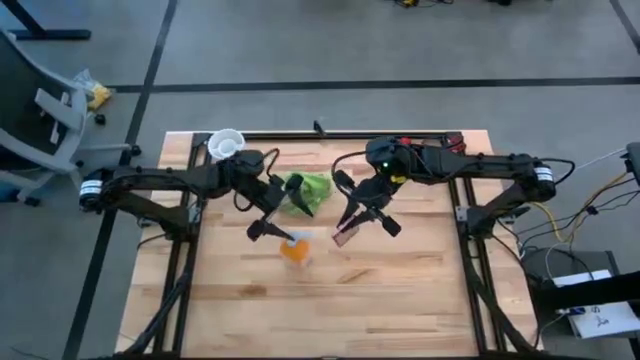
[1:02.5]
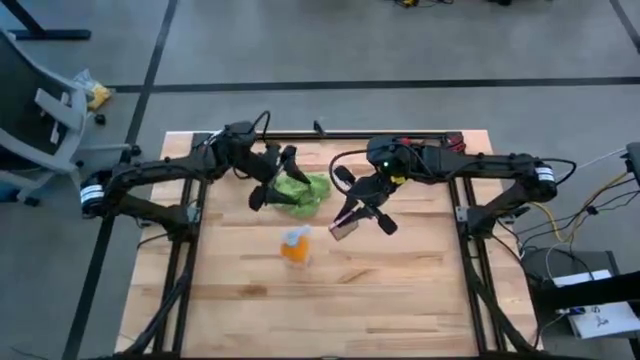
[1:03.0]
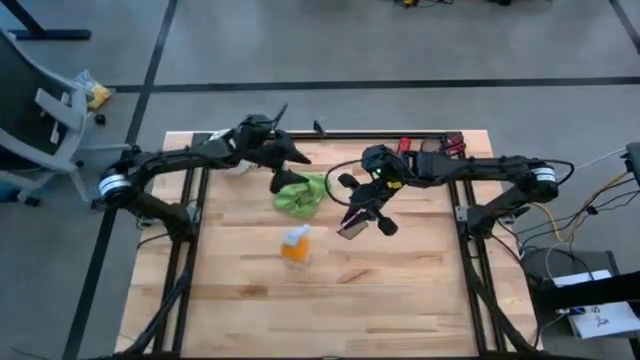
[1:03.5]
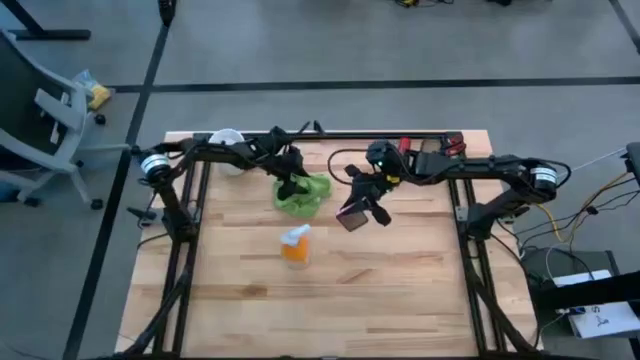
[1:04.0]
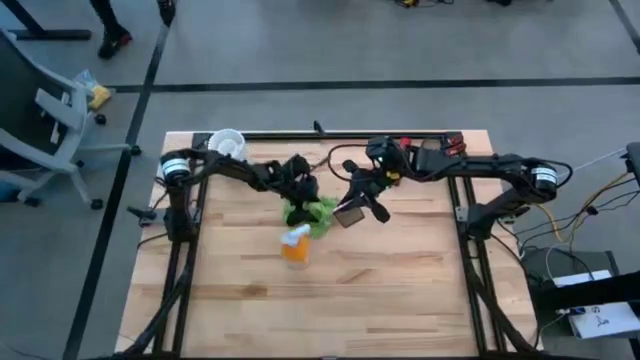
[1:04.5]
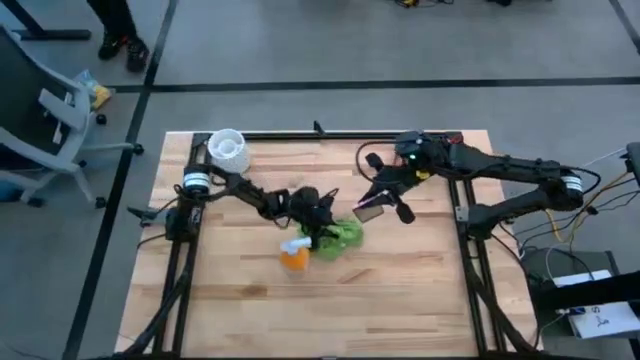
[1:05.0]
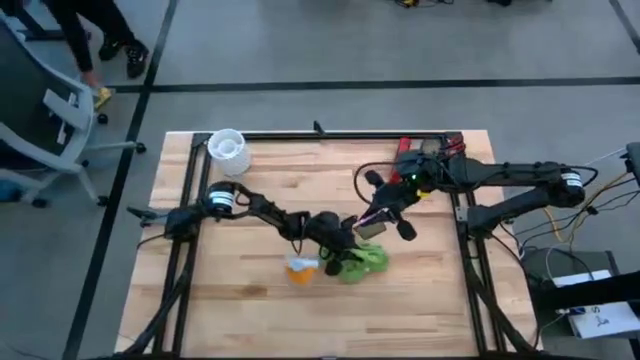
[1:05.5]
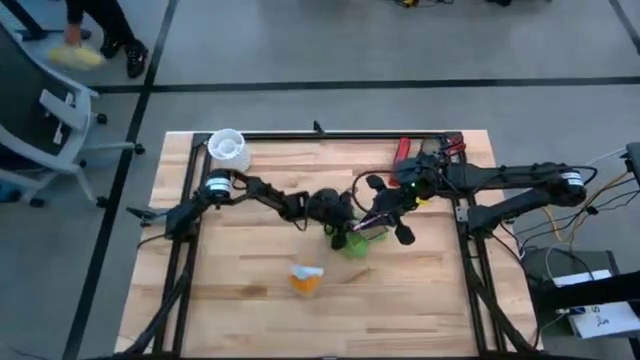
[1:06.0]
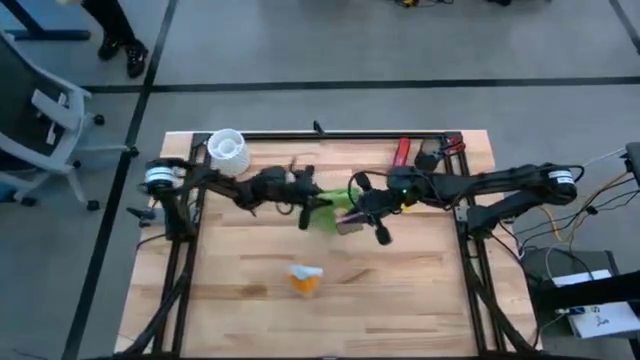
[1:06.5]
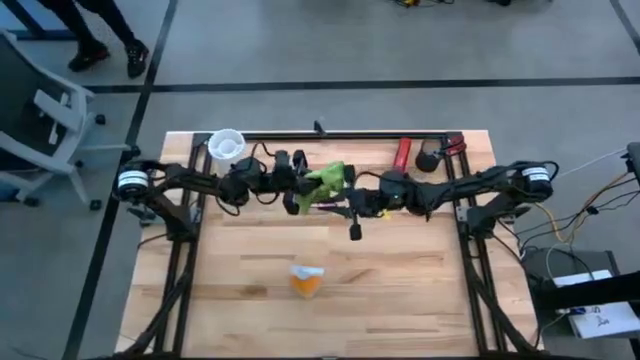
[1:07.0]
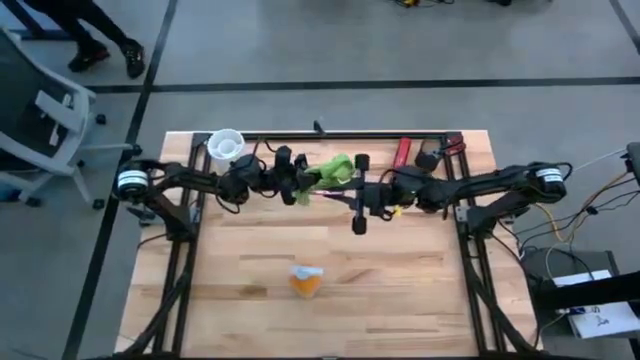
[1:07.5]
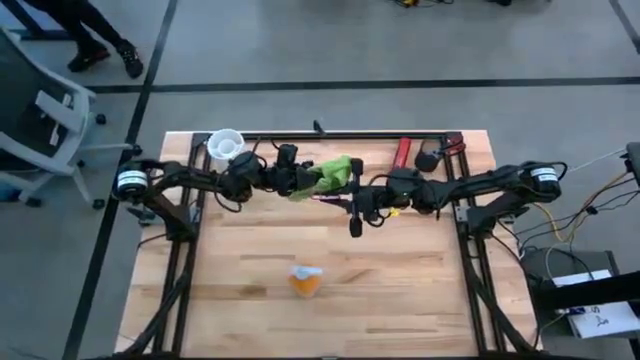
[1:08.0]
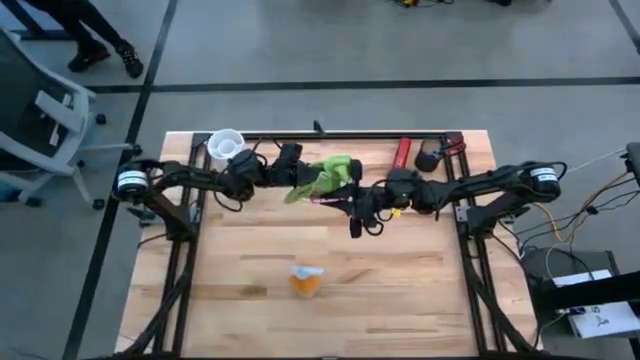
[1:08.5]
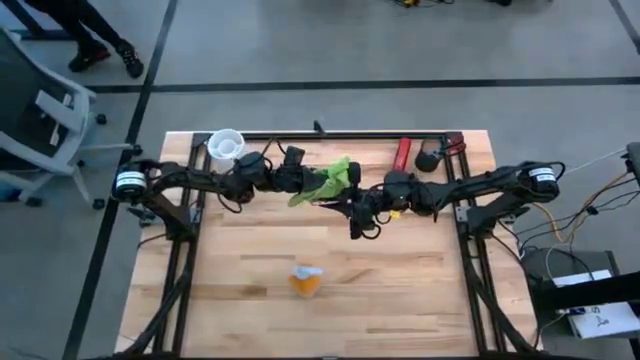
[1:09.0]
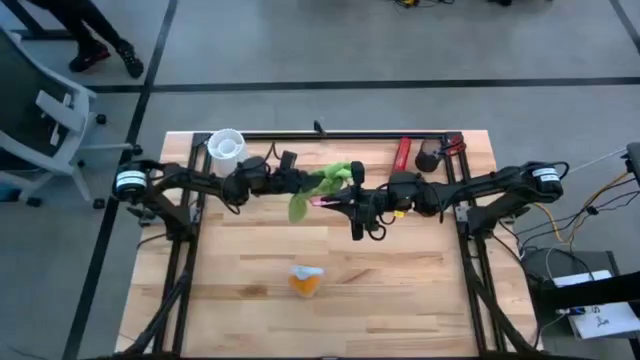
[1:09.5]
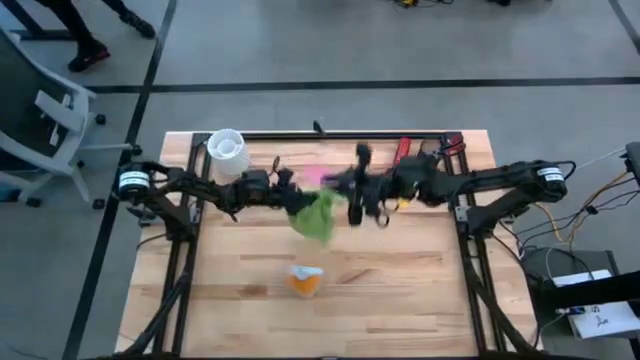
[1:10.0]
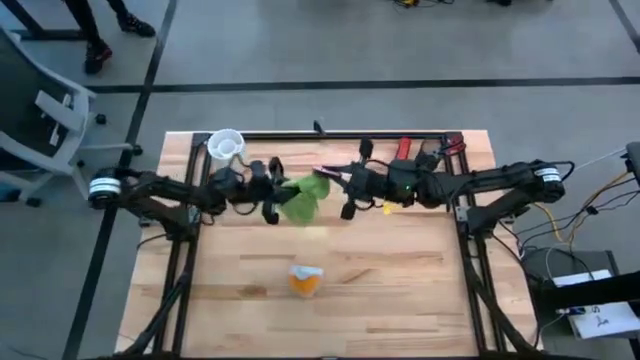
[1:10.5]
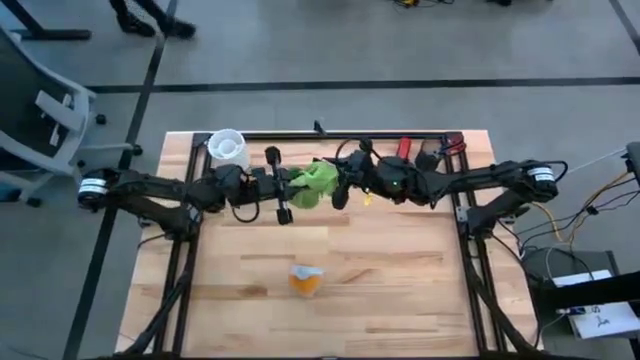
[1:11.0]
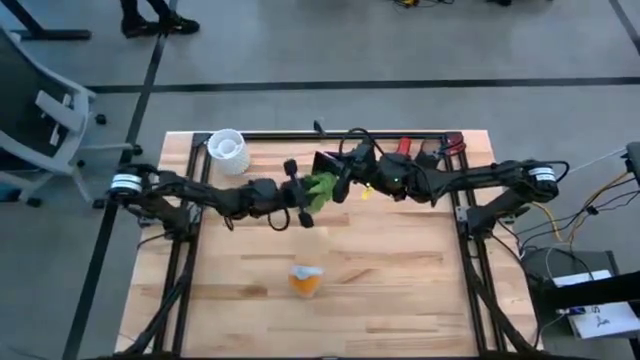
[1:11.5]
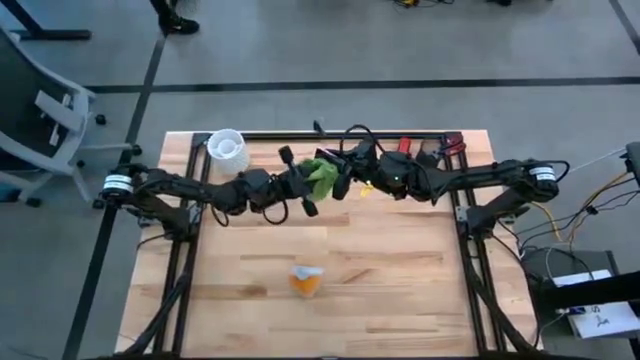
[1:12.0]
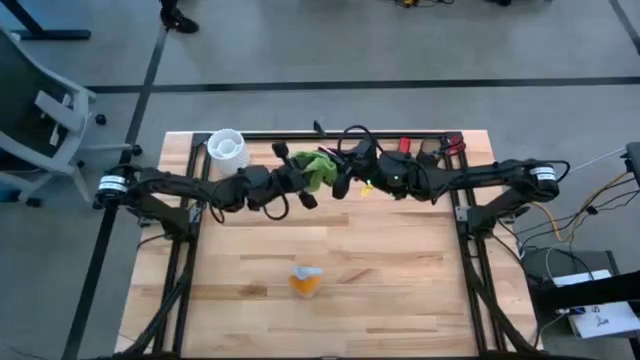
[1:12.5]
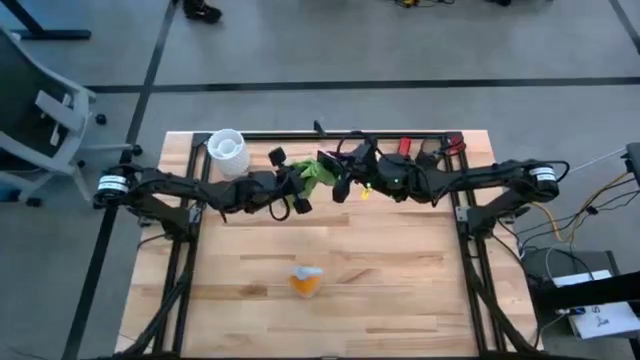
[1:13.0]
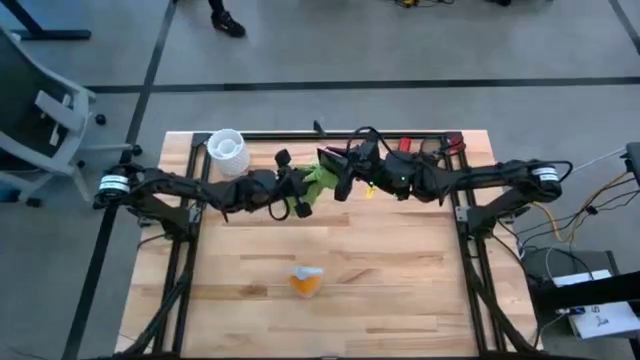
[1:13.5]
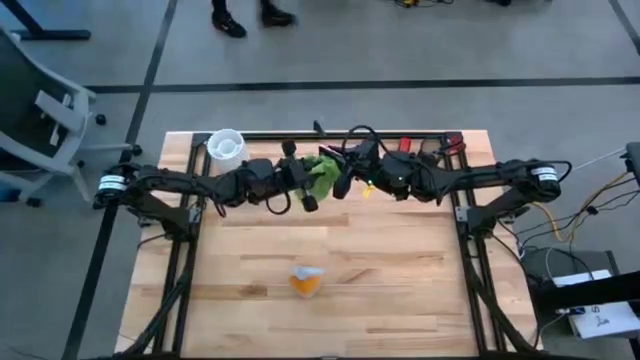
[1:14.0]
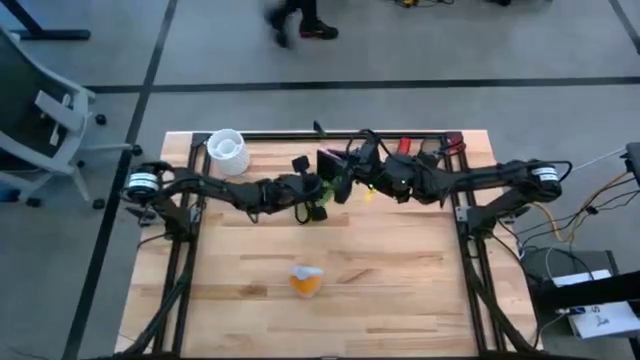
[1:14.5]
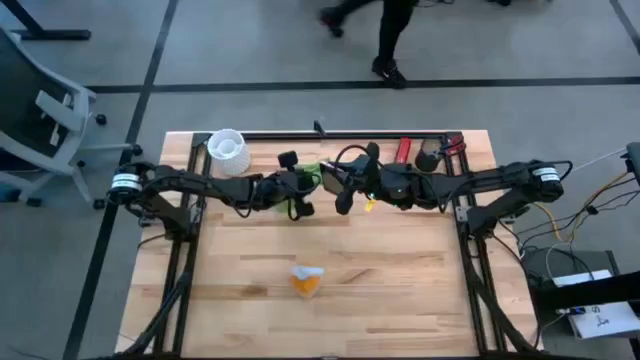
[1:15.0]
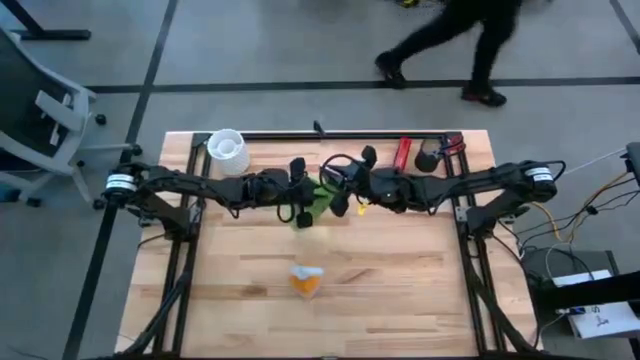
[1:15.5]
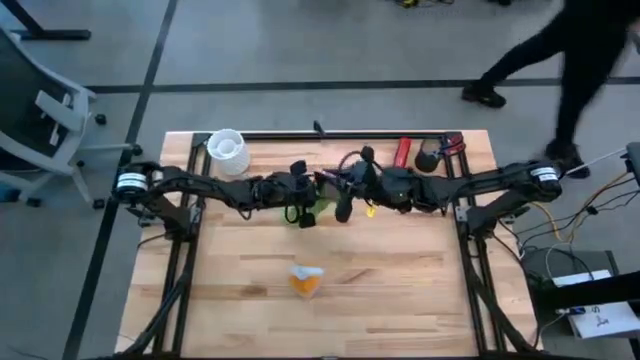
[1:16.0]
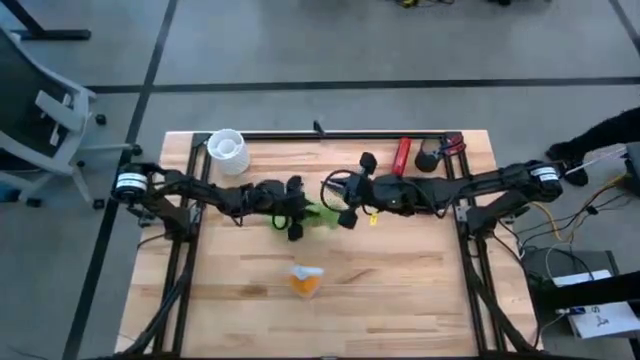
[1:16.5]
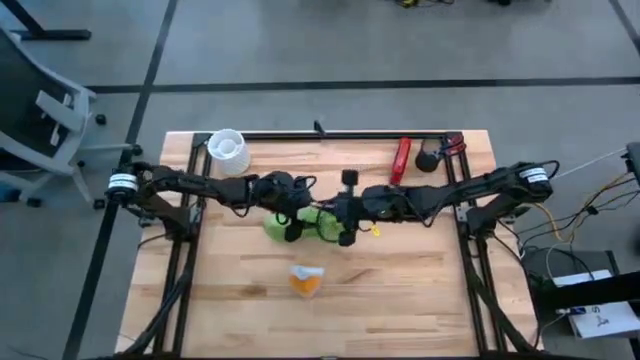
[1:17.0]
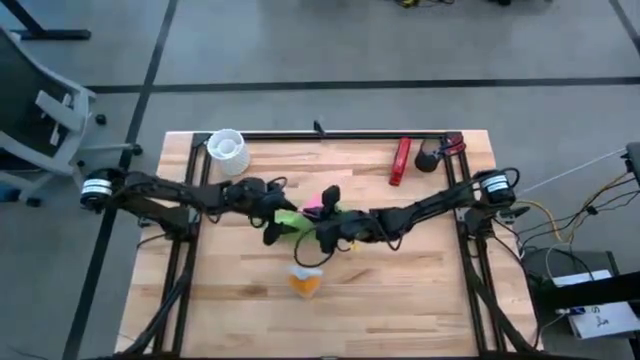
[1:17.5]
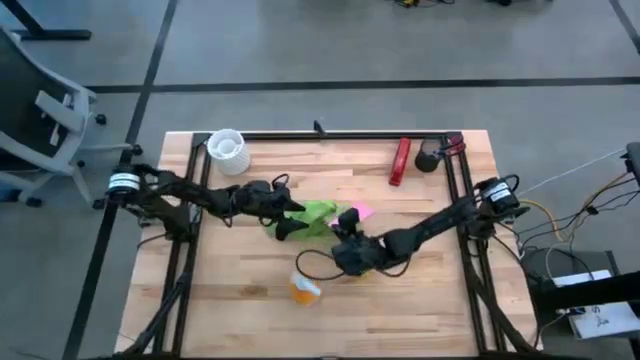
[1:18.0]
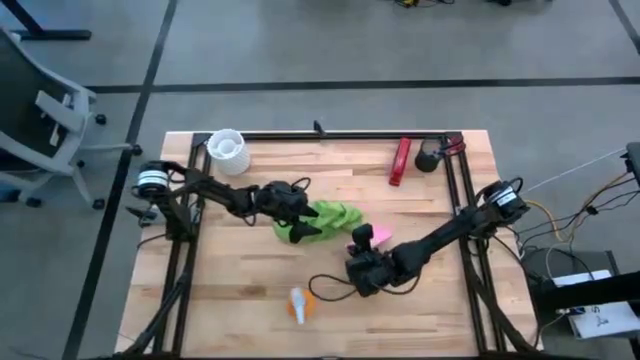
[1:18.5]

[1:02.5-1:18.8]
Task: Apply microfiber cloth
Wipe the back and front of the cellphone using the microfiber cloth

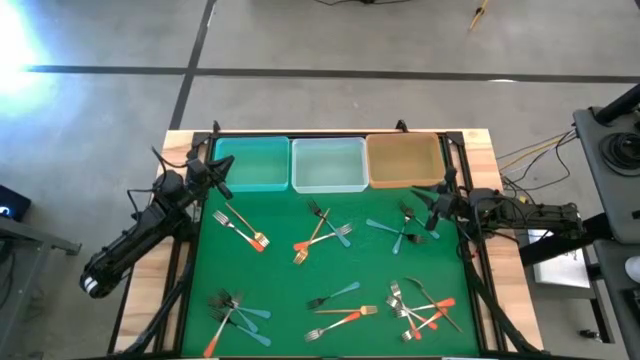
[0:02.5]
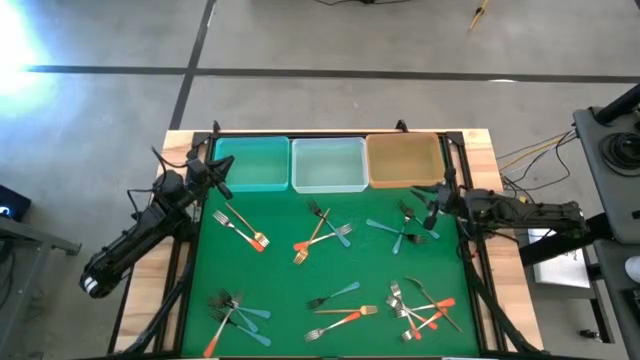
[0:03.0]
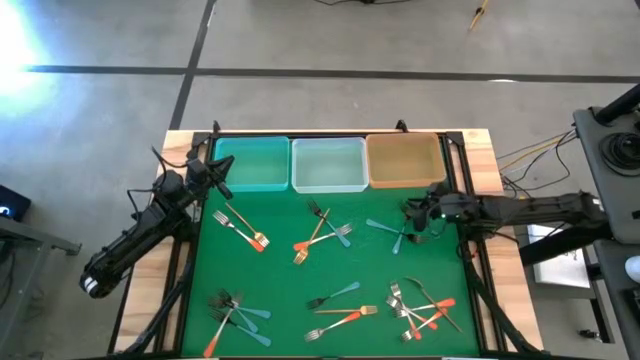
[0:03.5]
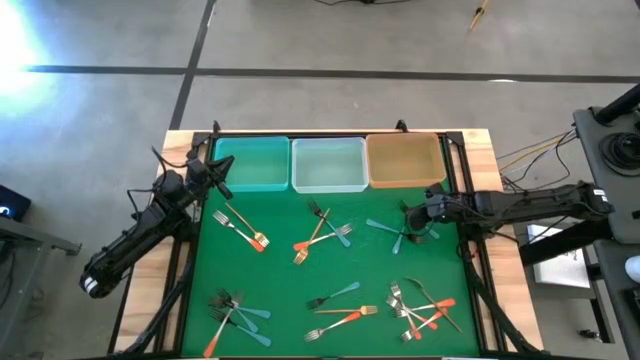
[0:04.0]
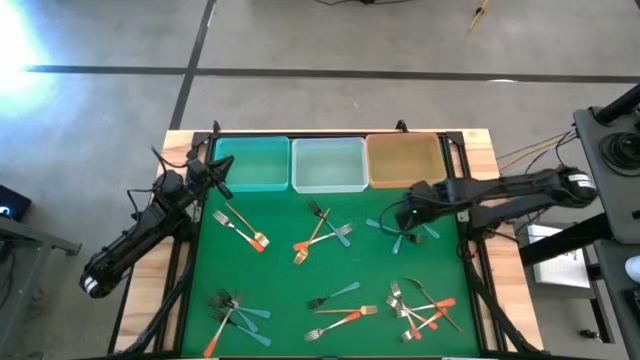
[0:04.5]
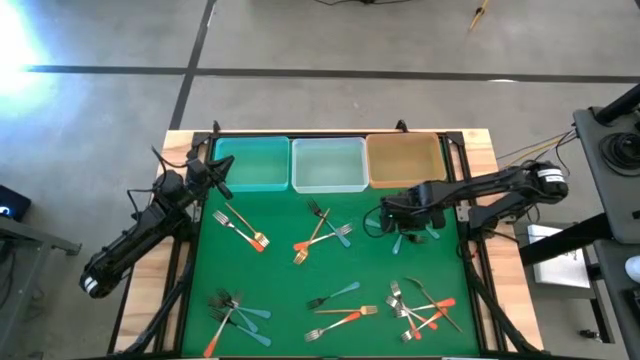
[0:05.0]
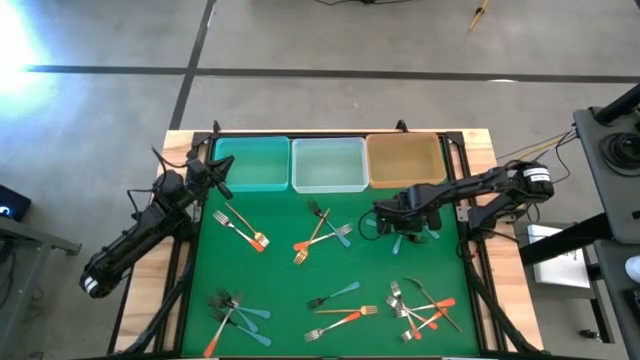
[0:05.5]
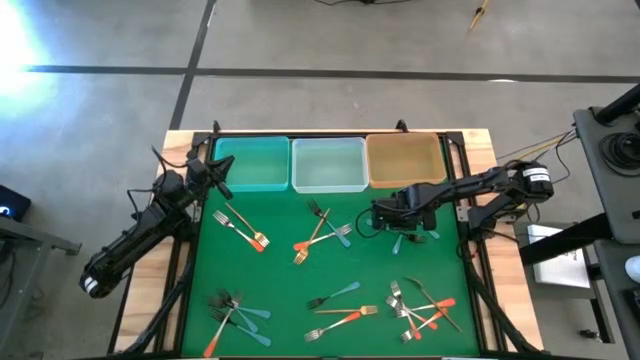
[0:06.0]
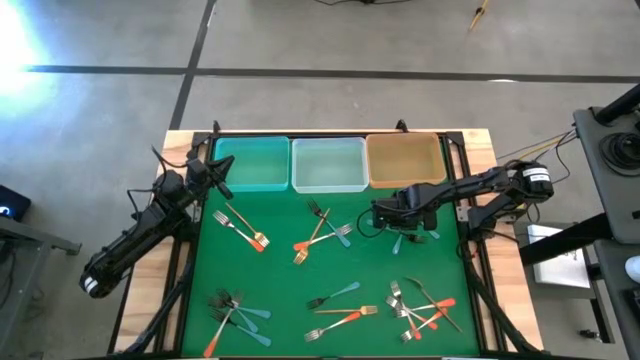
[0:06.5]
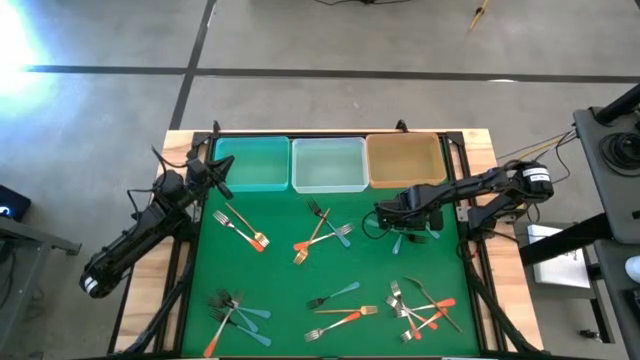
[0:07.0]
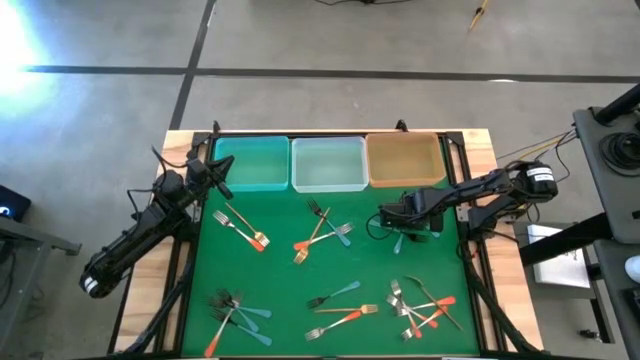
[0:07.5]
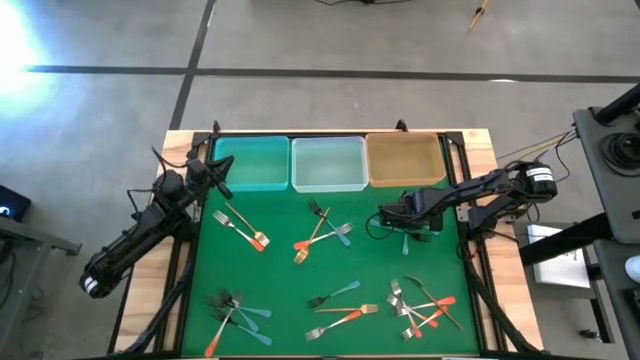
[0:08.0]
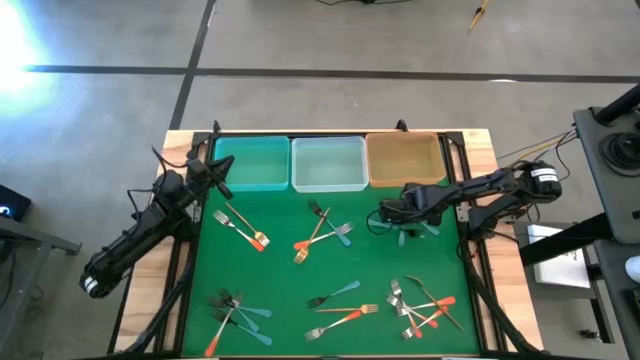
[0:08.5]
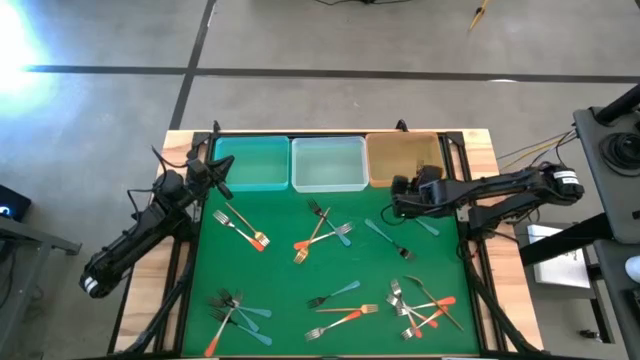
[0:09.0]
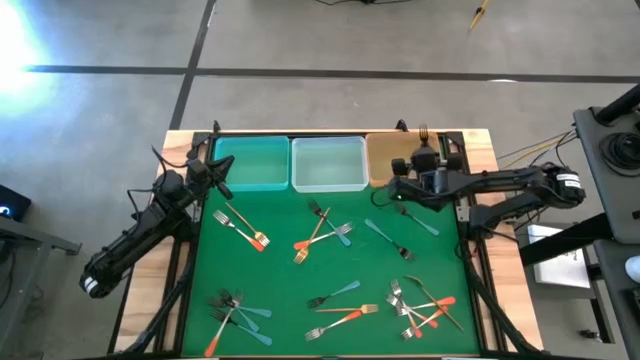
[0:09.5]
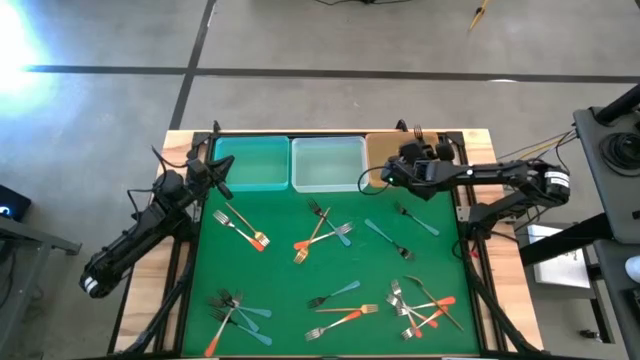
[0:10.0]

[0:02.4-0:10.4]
Task: Sort silverware by color (type)
Put the blue fork into the orange bin
